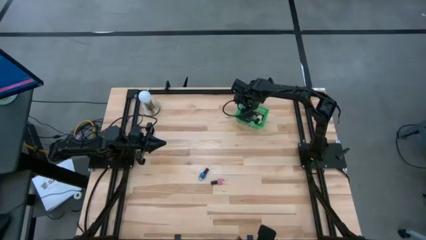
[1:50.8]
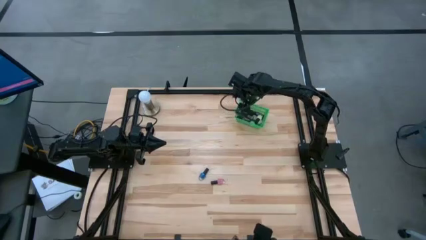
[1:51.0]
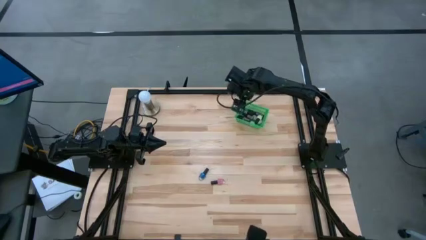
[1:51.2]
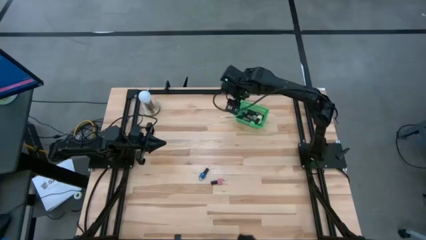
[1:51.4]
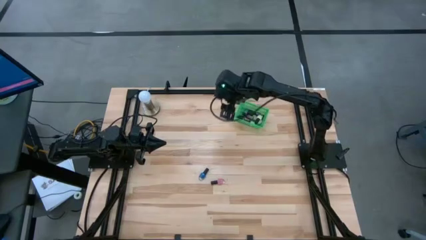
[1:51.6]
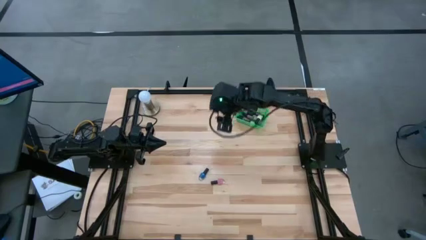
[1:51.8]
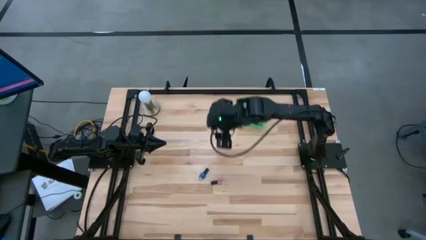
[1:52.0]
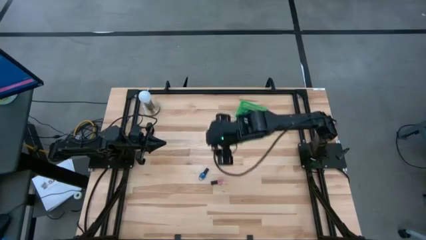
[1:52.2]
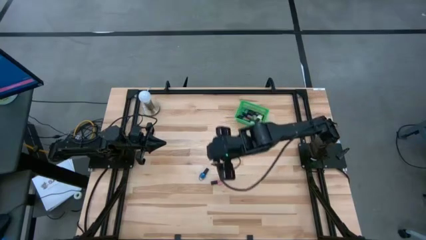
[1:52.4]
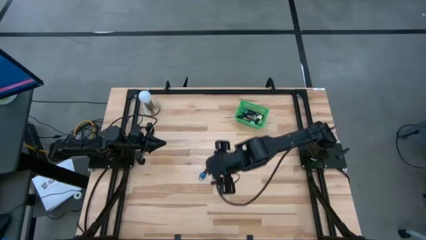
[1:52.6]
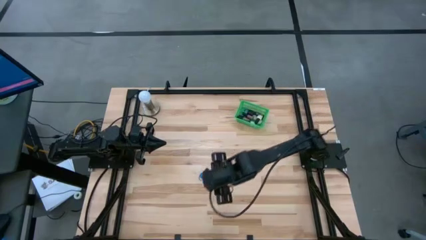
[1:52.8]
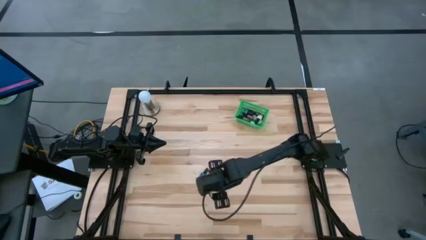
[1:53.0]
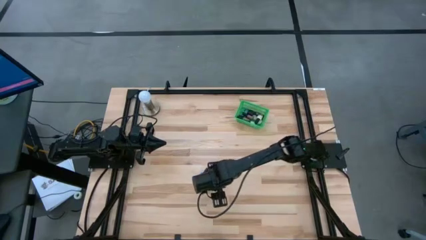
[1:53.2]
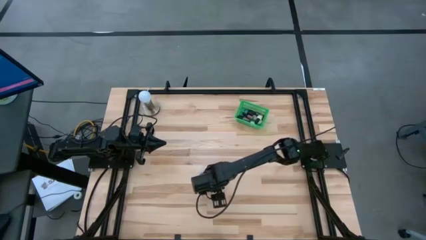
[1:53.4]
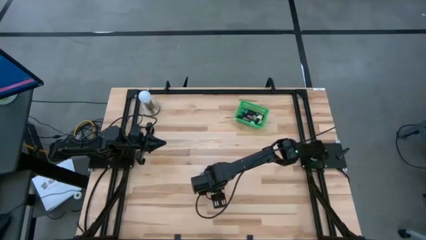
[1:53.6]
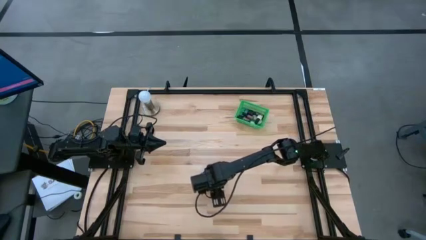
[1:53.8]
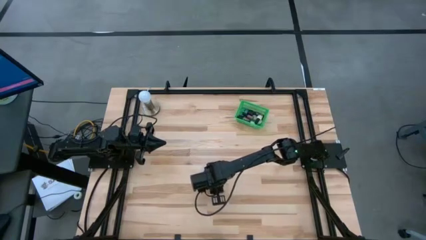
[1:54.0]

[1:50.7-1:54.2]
Task: Pick & Place Nail Polish
Put the pink nail polish into the green bin

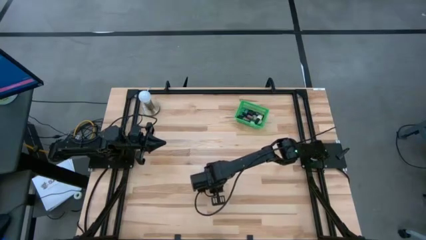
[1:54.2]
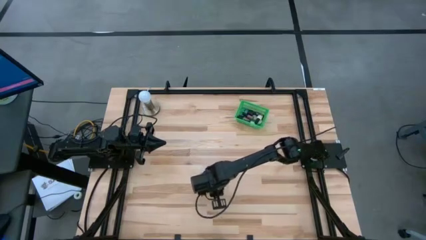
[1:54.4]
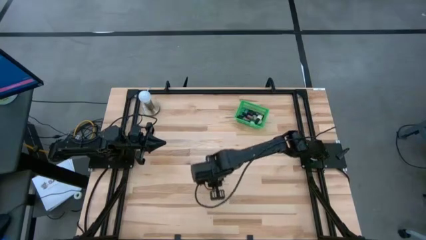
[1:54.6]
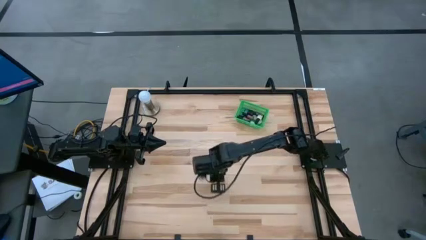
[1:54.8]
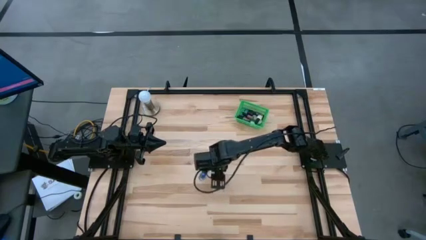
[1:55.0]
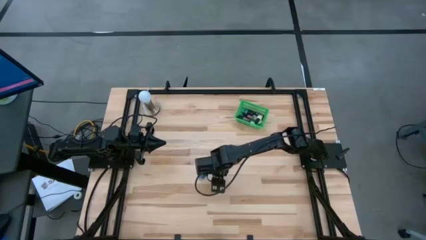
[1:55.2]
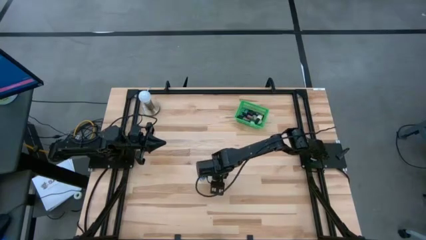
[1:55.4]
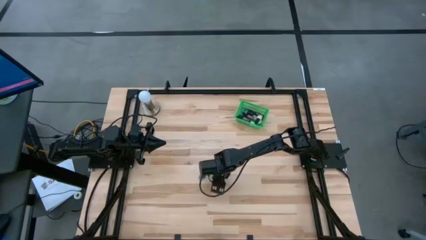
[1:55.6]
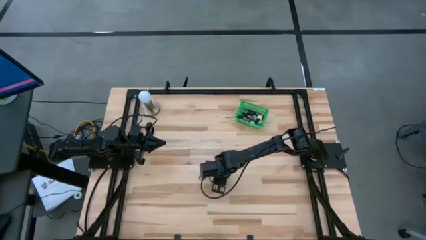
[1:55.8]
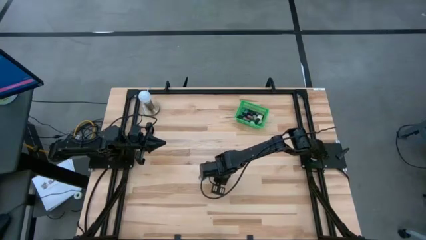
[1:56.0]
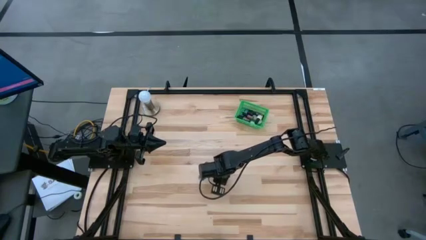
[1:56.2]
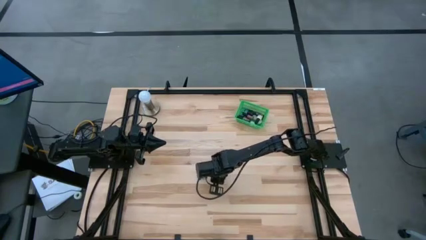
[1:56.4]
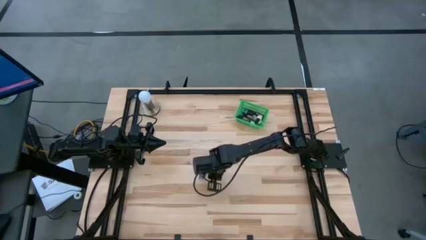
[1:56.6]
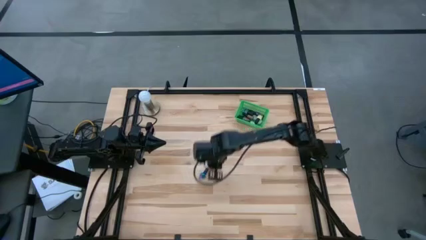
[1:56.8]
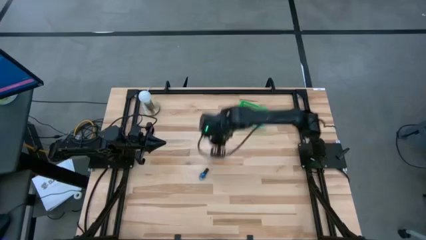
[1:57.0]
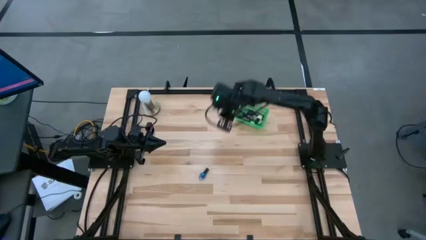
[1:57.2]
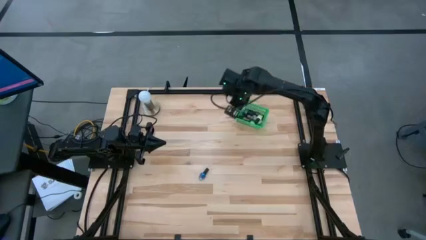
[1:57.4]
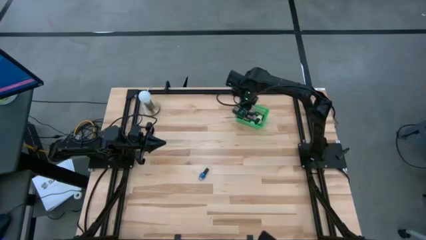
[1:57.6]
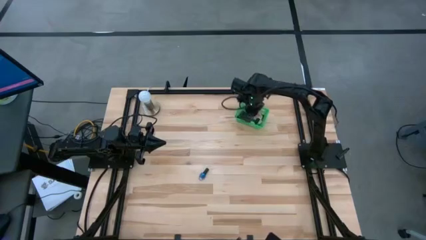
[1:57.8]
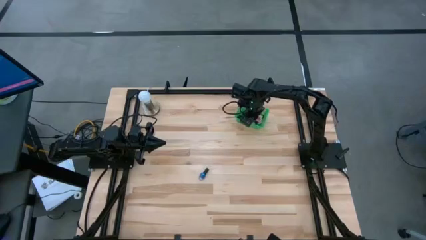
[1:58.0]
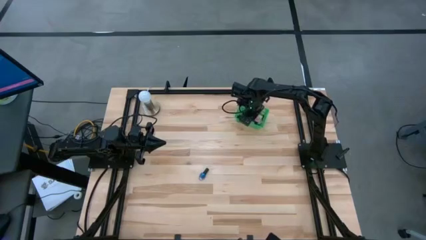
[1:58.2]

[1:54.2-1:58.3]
Put the pink nail polish into the green bin

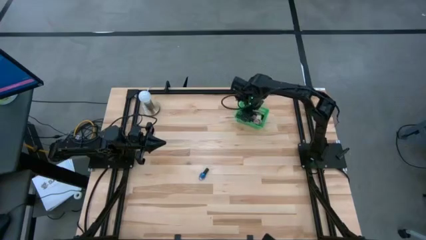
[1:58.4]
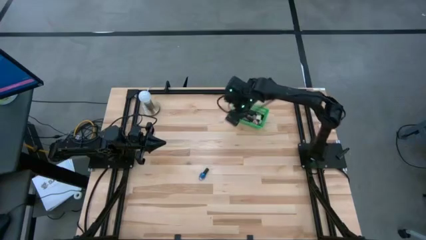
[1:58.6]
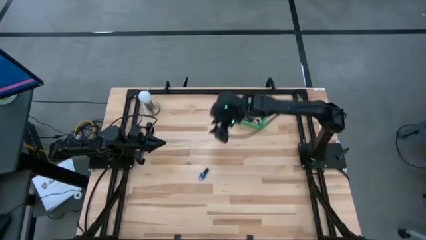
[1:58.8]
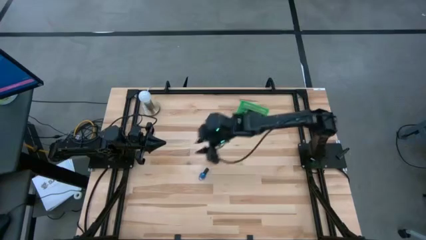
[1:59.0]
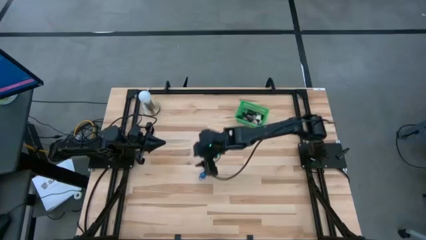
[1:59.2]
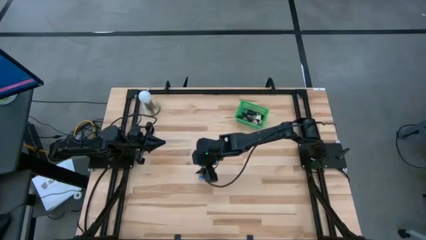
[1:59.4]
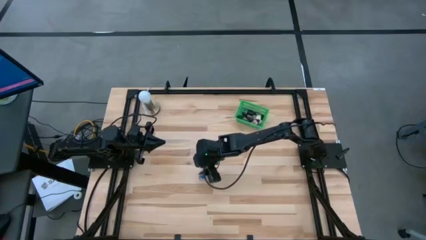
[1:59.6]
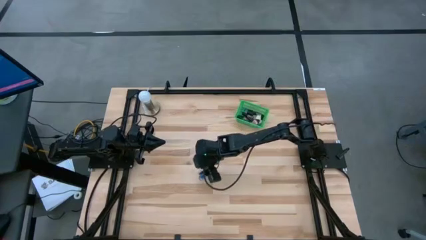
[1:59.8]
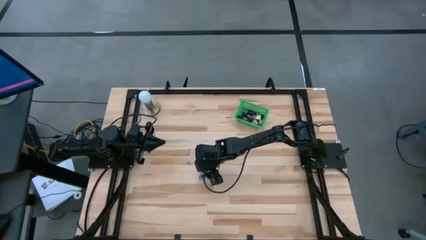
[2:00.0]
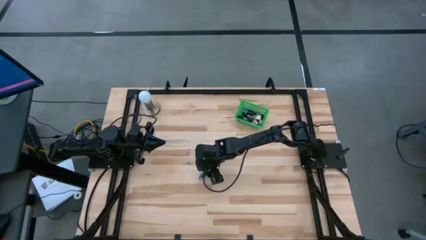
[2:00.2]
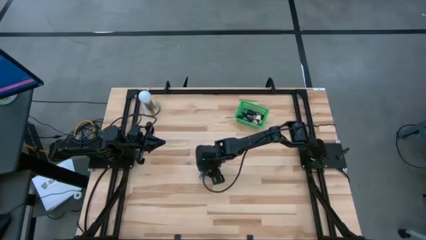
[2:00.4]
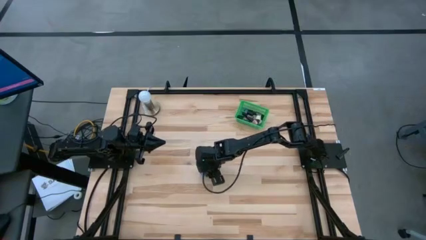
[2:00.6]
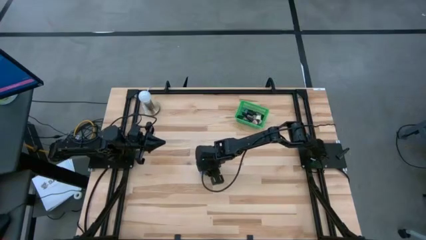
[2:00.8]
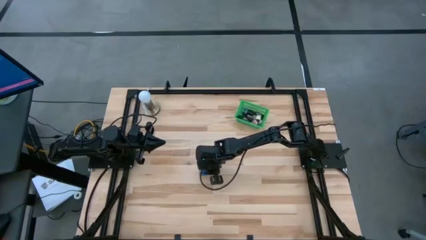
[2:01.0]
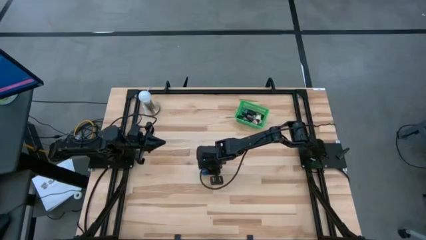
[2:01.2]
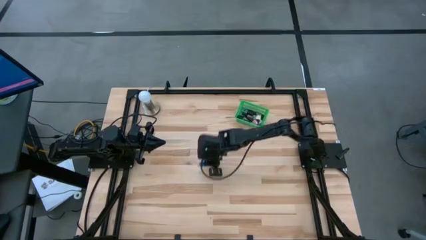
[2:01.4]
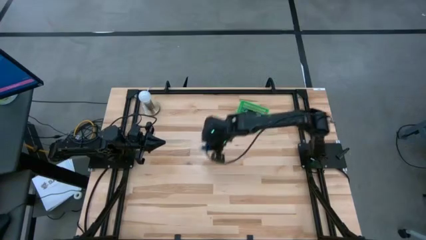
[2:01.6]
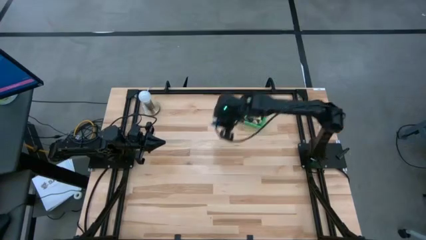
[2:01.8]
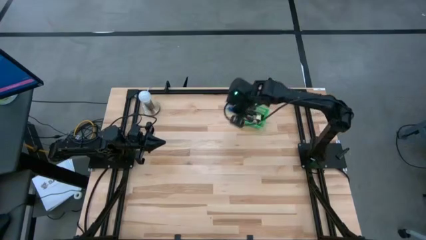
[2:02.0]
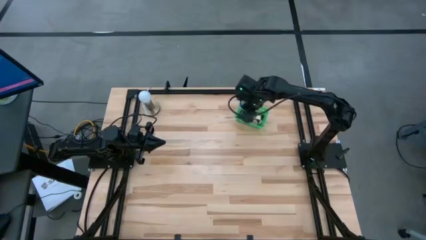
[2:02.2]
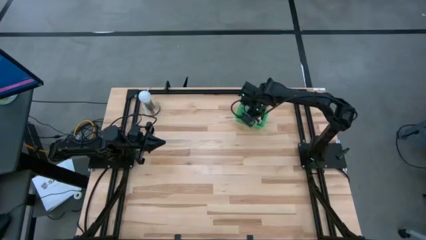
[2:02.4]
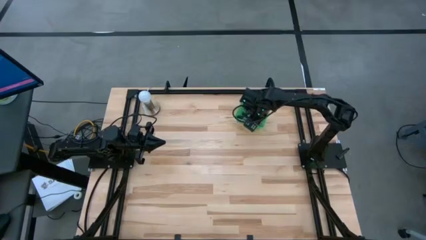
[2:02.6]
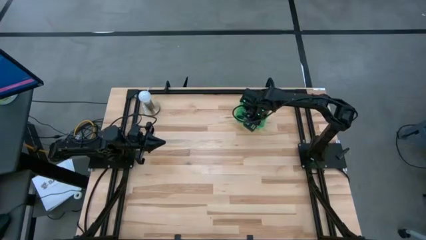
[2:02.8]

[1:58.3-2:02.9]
Put the blue nail polish into the green bin

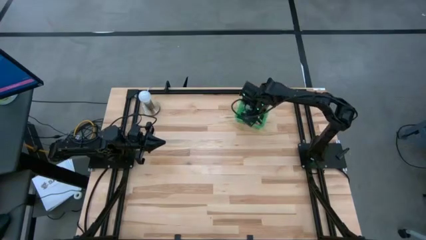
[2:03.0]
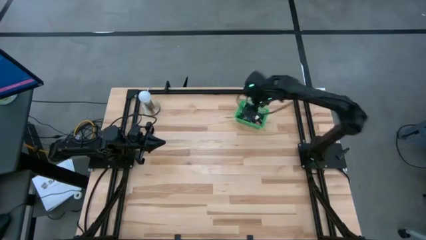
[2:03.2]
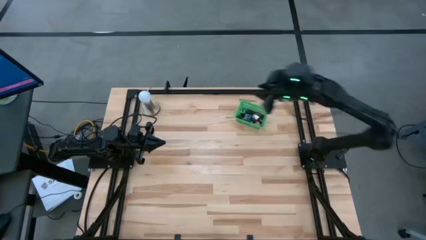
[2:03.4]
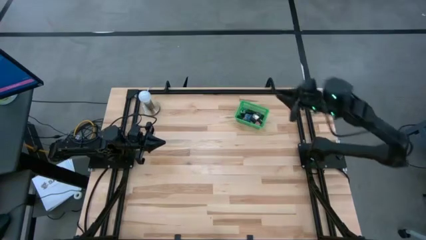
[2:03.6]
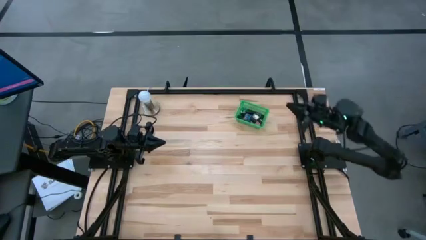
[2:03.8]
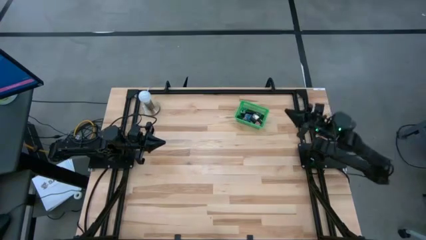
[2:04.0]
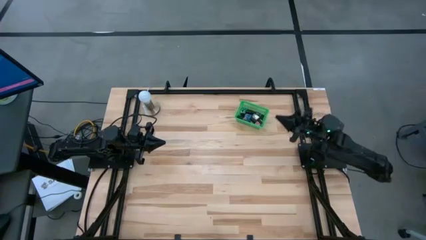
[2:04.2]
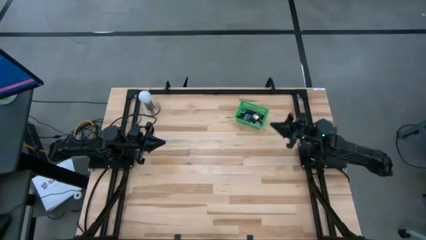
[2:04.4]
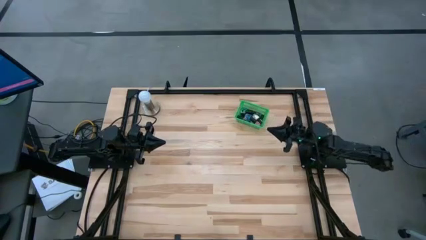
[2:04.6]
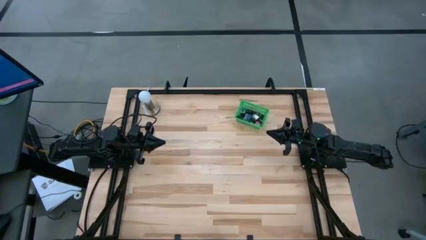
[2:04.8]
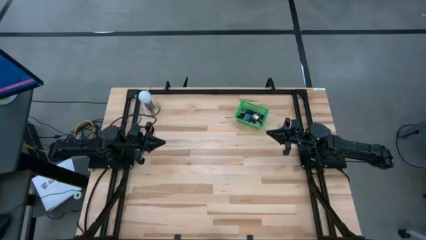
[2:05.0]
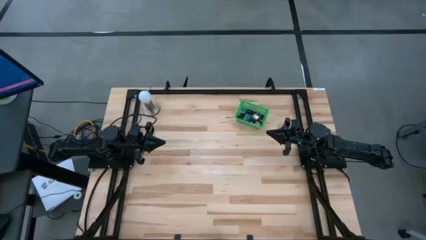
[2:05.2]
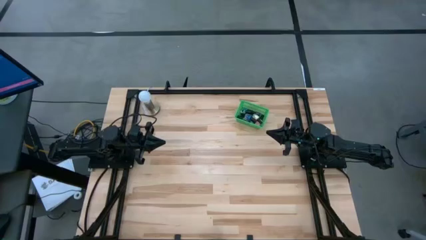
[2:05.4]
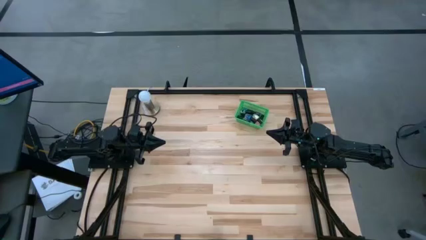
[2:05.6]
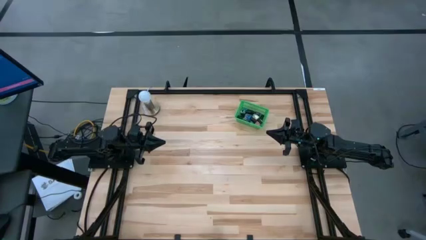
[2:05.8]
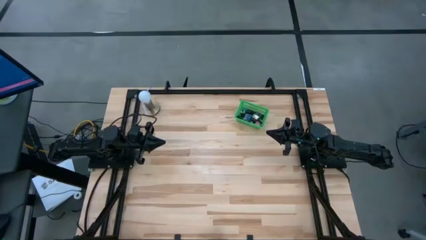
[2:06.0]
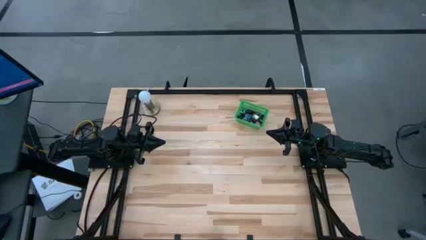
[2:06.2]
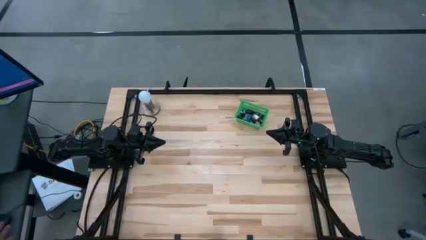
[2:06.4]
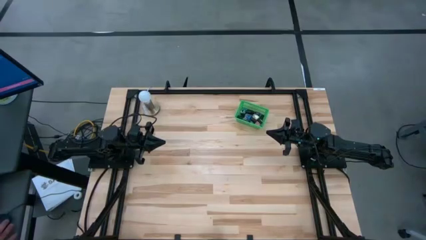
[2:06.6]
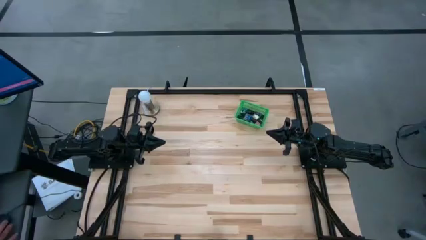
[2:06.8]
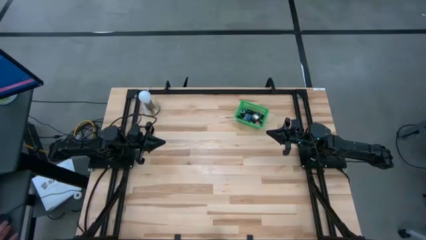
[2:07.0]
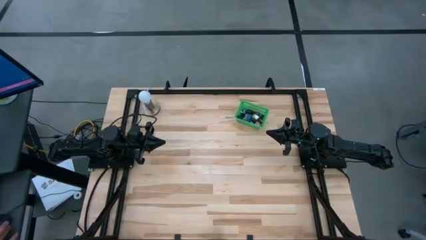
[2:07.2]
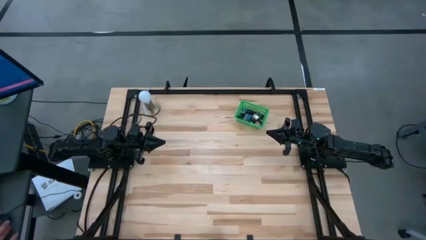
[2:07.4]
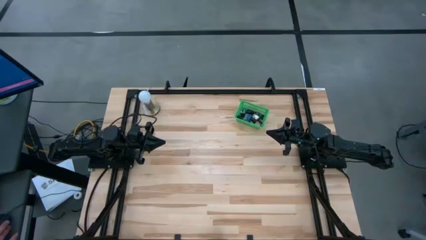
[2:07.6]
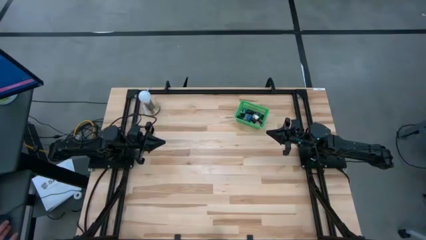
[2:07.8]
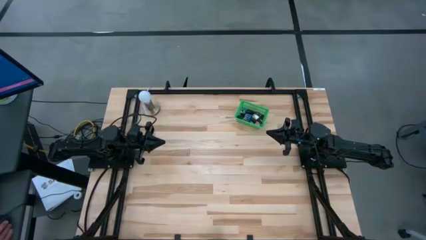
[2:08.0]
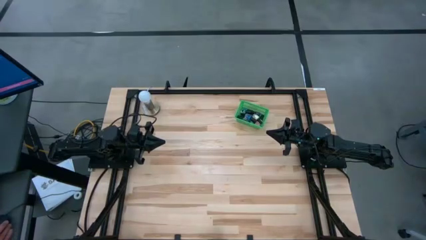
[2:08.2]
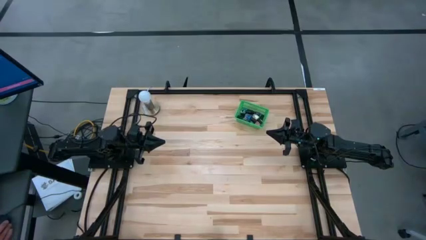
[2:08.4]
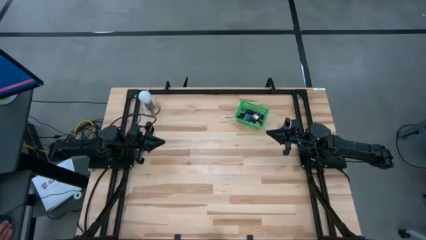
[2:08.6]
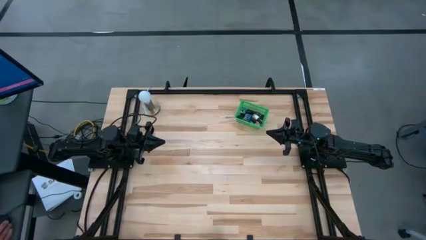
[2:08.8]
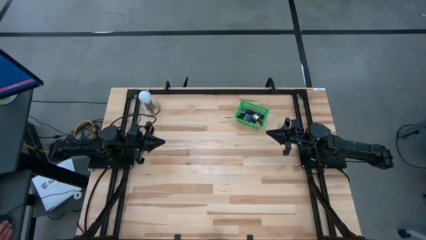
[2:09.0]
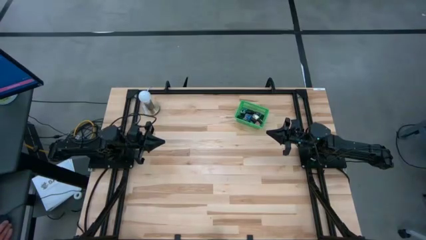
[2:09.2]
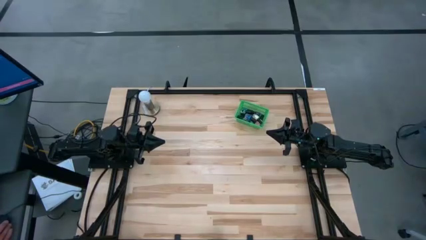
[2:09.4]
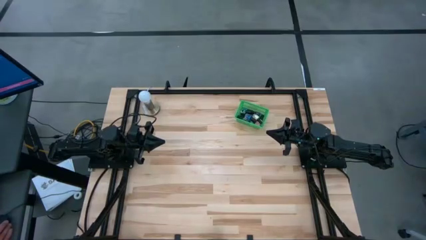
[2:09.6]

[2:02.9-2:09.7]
Return to Home Position
